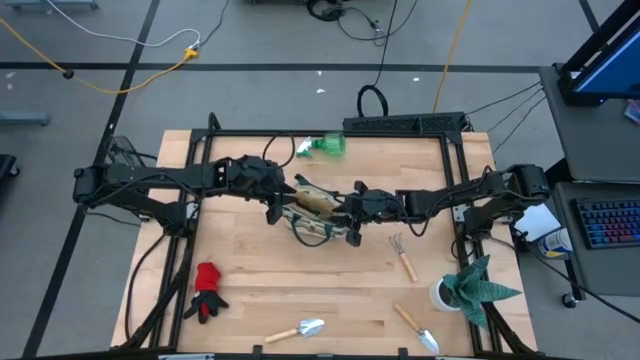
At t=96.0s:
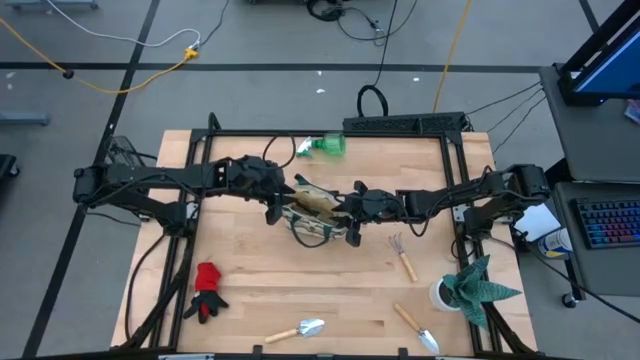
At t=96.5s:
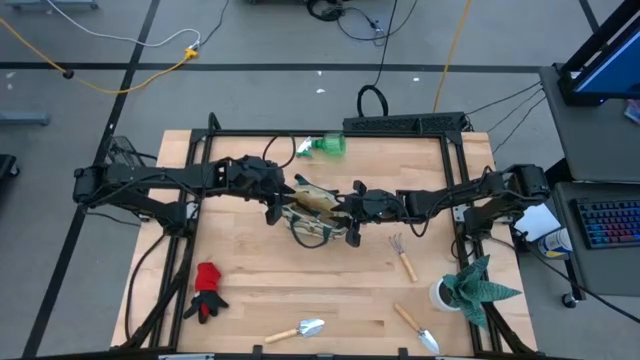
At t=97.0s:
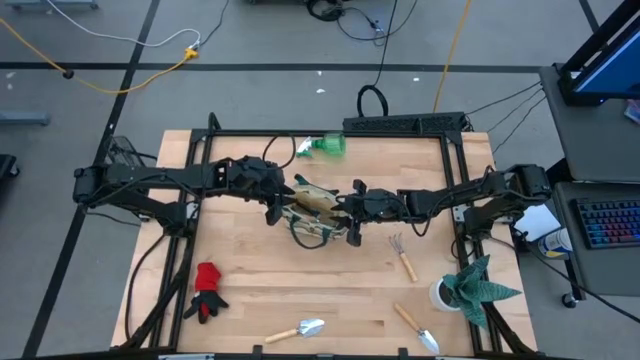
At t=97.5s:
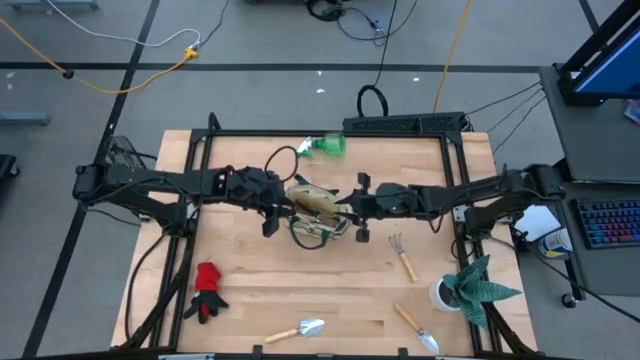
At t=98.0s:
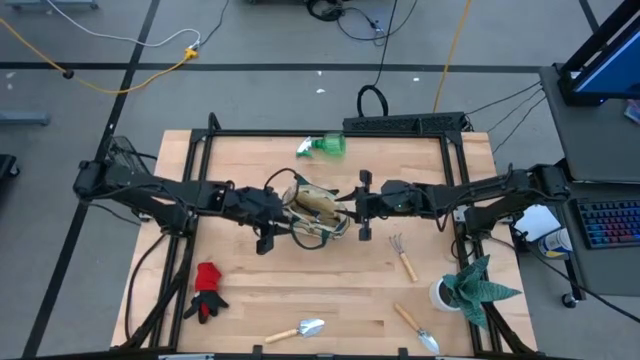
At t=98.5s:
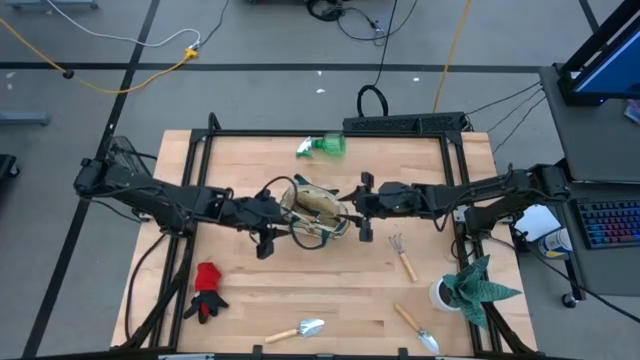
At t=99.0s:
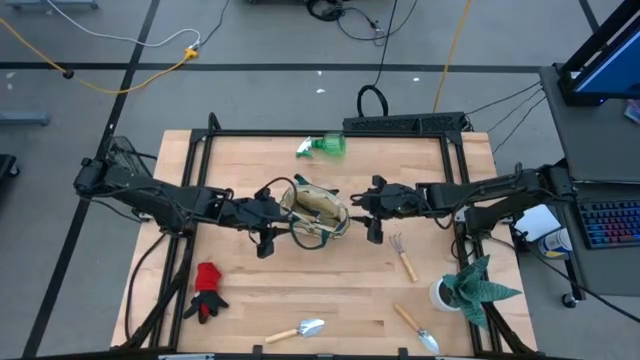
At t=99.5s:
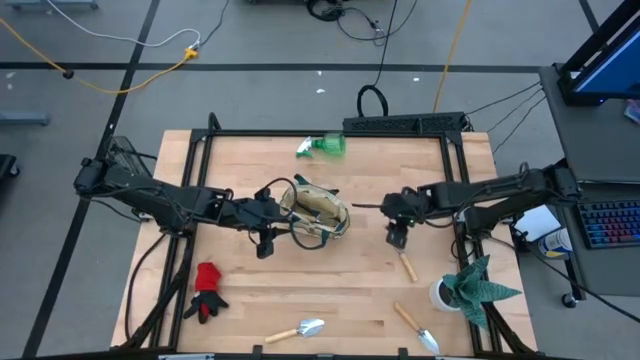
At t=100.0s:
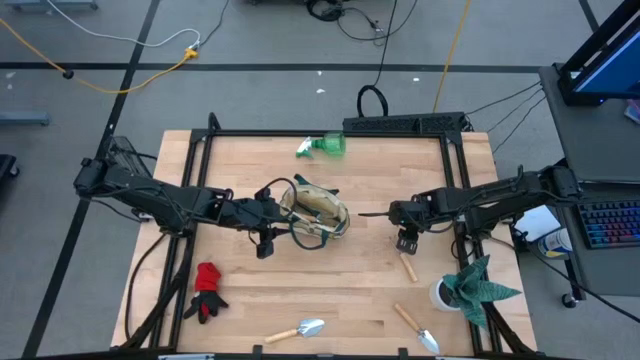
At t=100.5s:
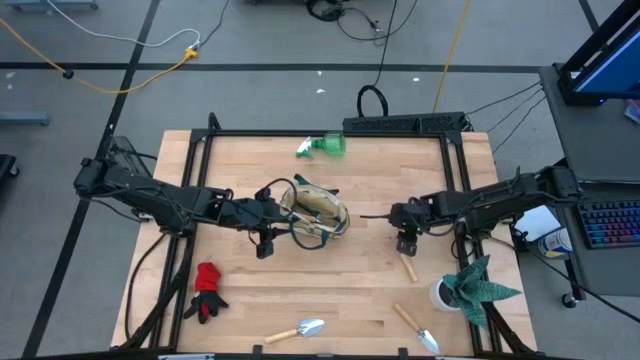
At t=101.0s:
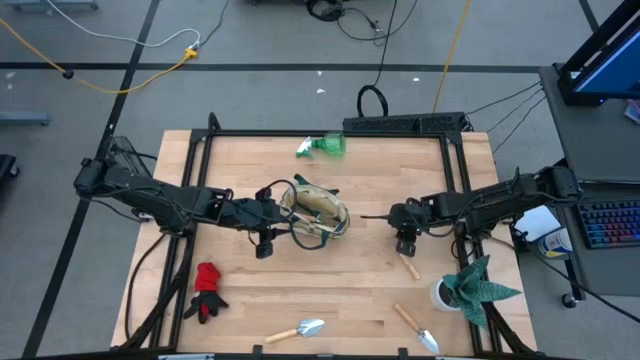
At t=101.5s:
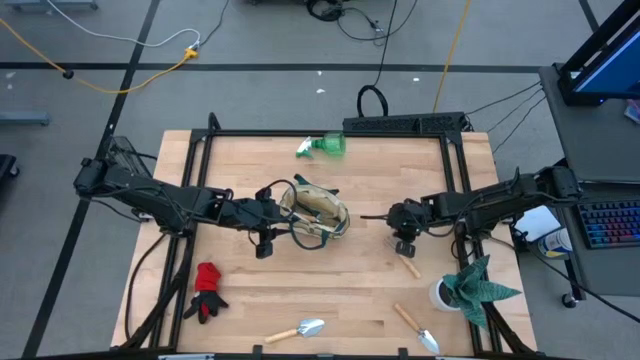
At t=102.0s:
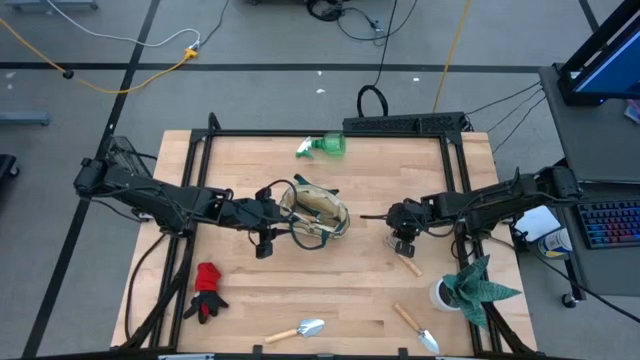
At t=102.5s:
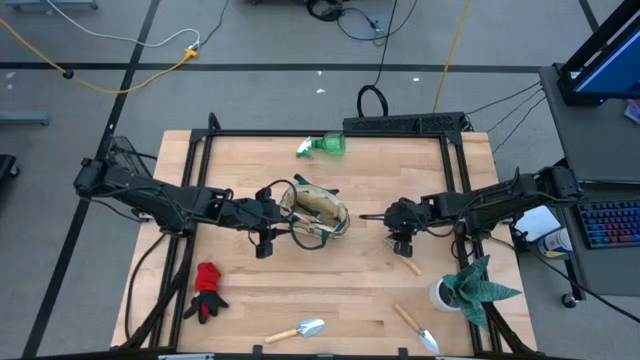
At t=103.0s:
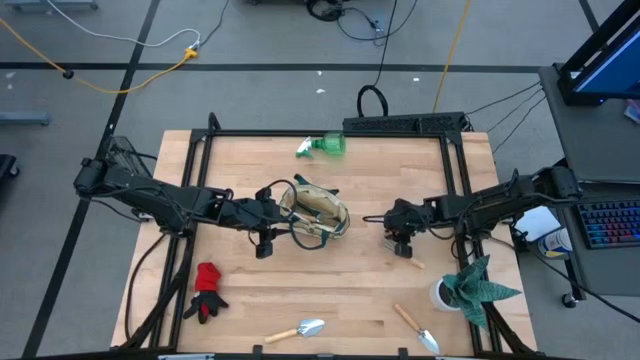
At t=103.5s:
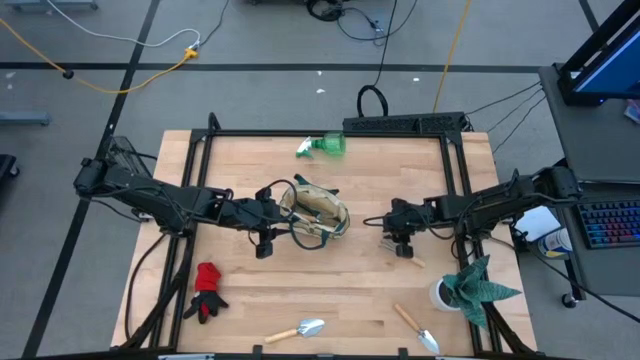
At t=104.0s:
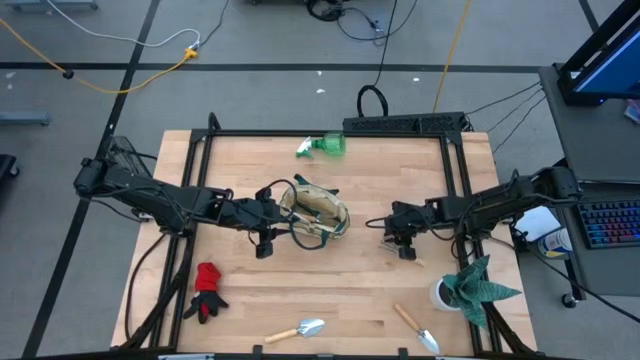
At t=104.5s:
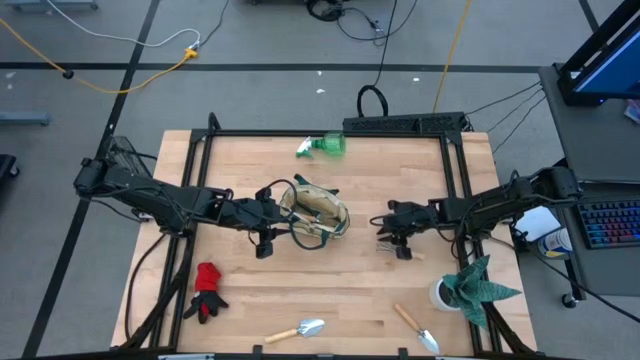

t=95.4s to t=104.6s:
Task: Pick & Place Garden tools in Gardening bag
Put the brown hand rake into the brown gardening bag

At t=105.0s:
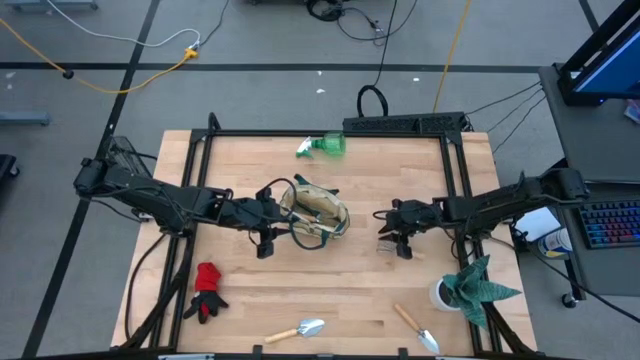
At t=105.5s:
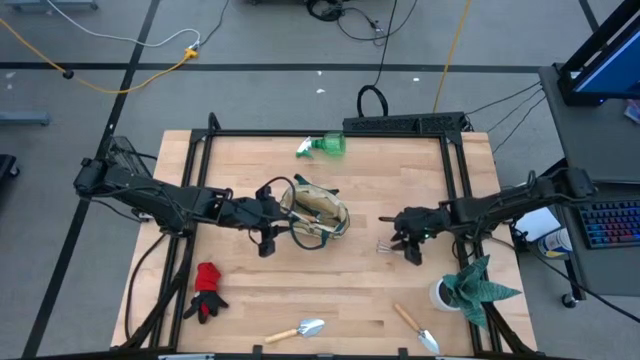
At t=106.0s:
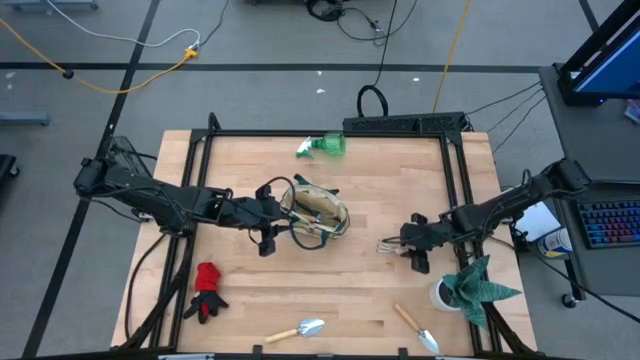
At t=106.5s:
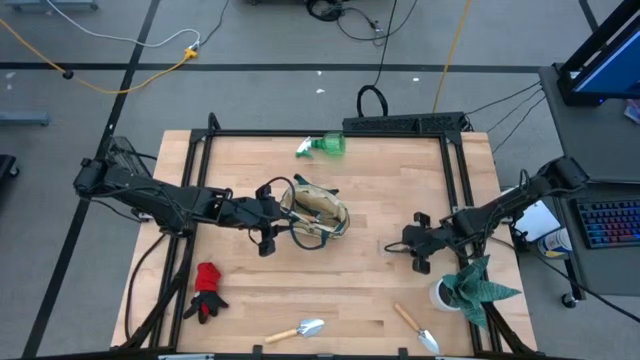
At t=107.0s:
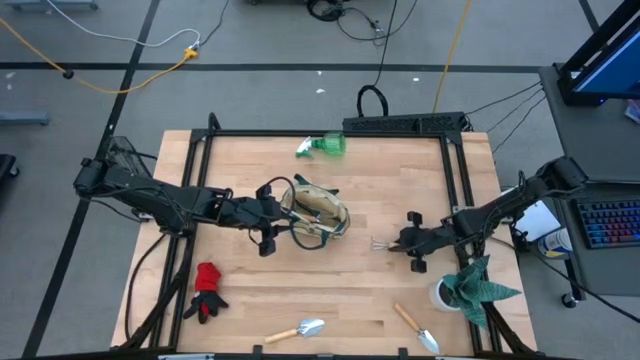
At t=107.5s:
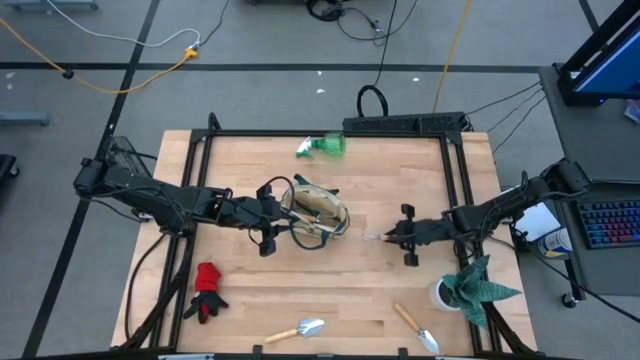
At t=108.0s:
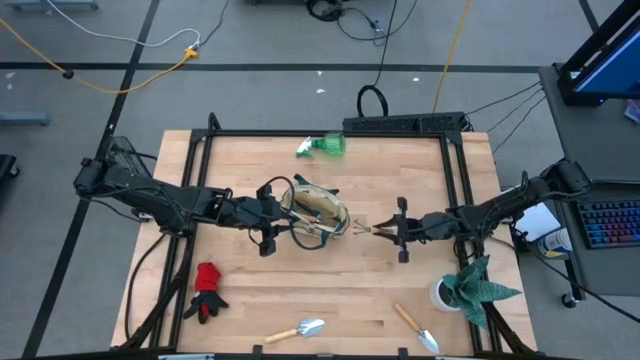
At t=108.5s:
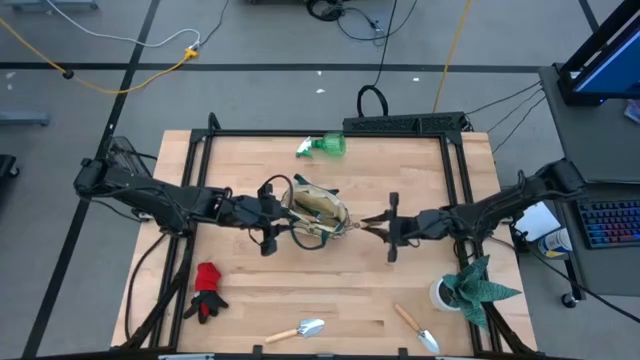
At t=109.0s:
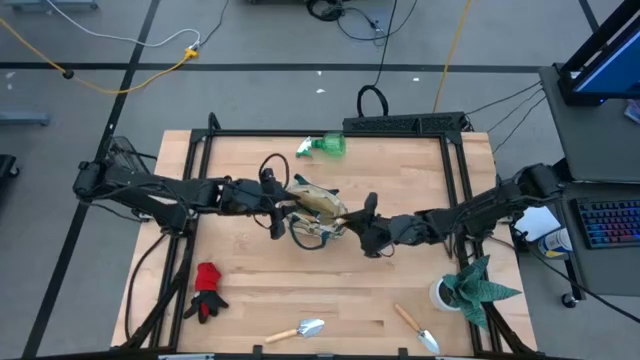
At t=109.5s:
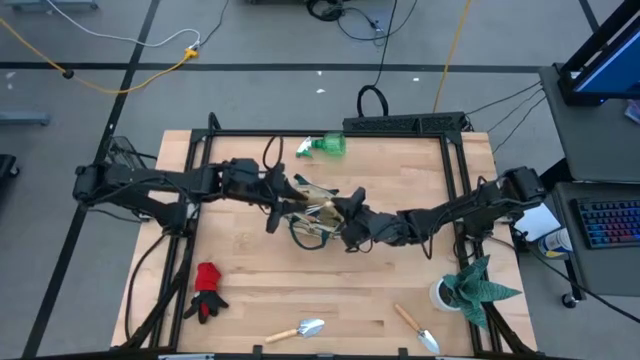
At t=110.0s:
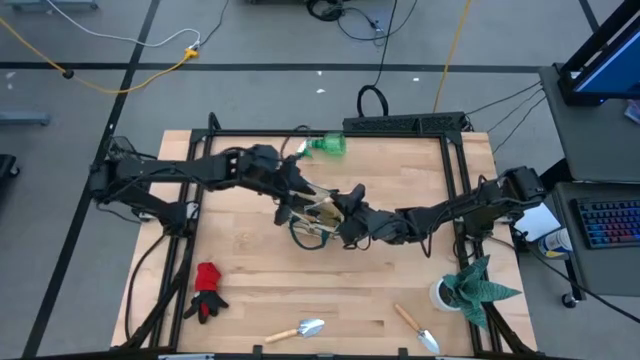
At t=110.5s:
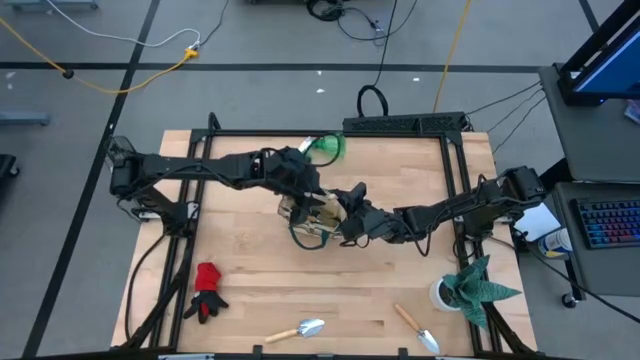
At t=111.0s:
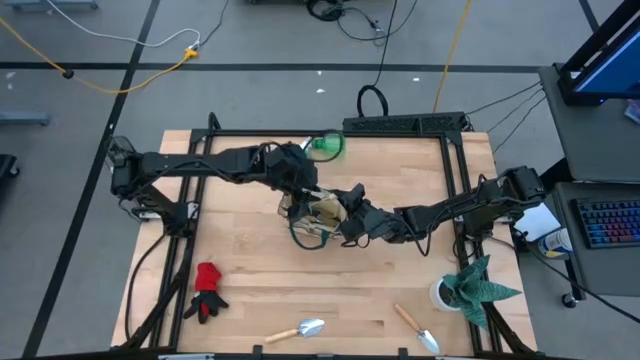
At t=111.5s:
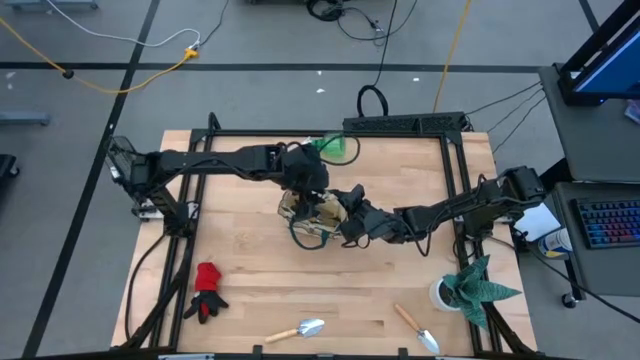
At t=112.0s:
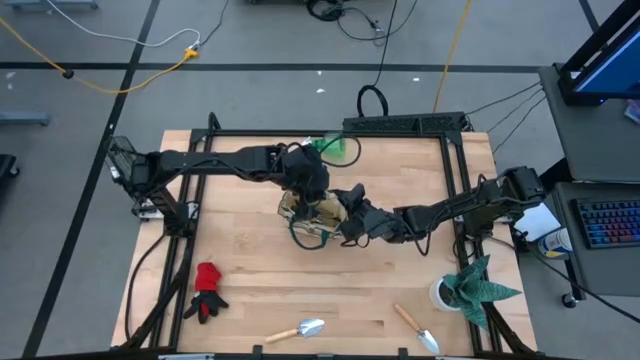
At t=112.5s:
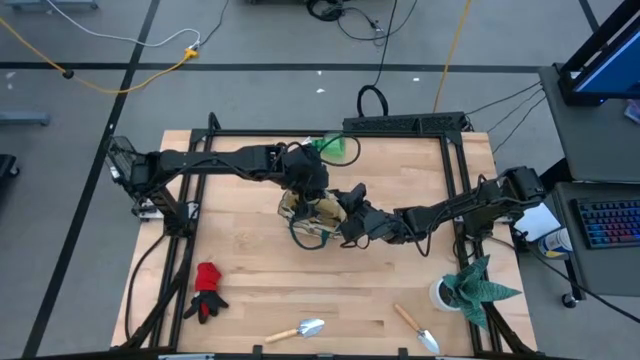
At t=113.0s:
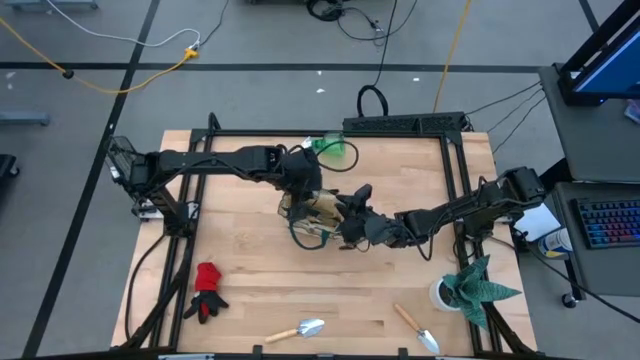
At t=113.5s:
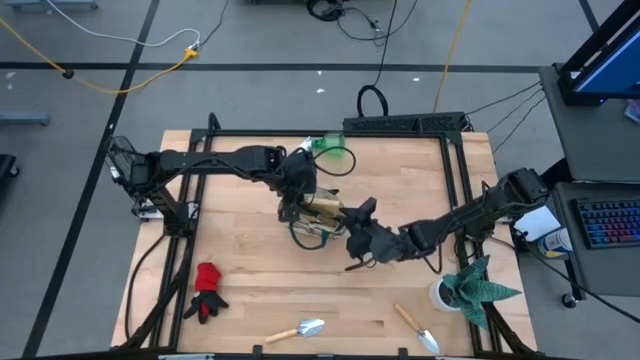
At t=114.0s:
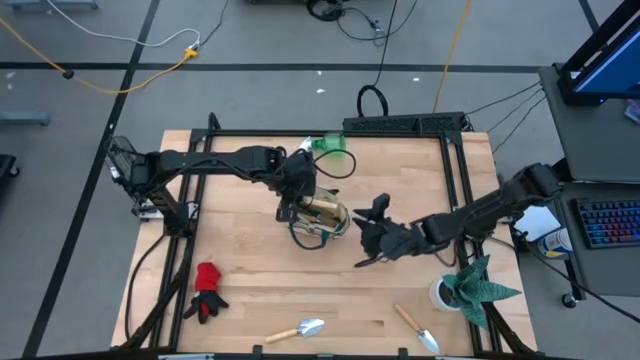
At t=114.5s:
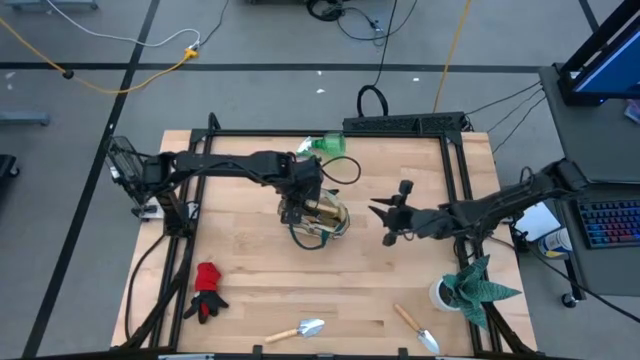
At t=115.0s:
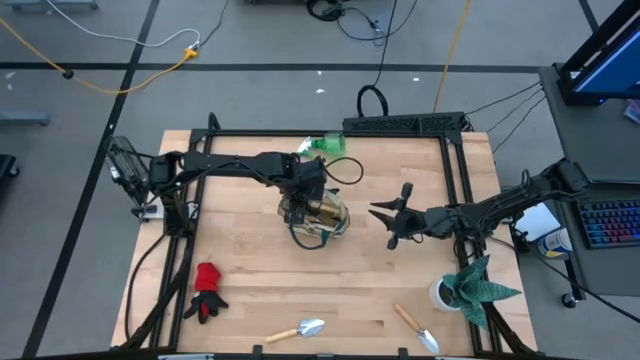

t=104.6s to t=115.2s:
Put the brown hand rake into the brown gardening bag

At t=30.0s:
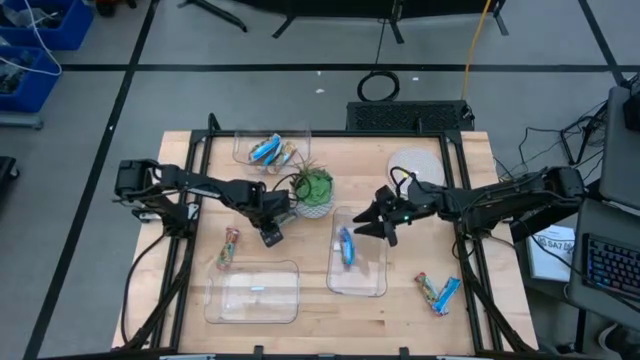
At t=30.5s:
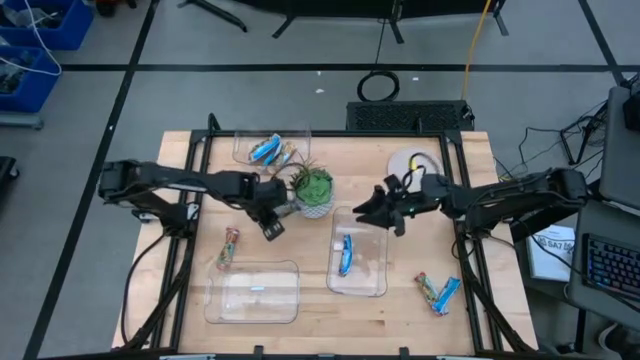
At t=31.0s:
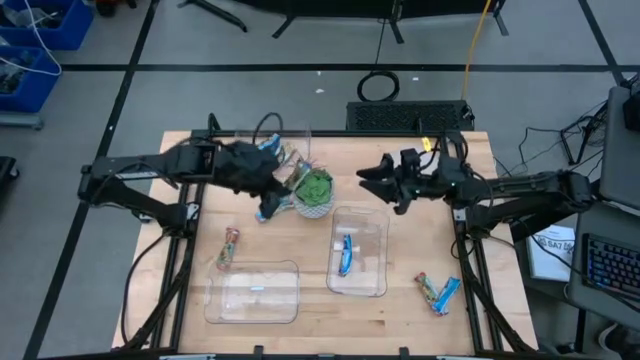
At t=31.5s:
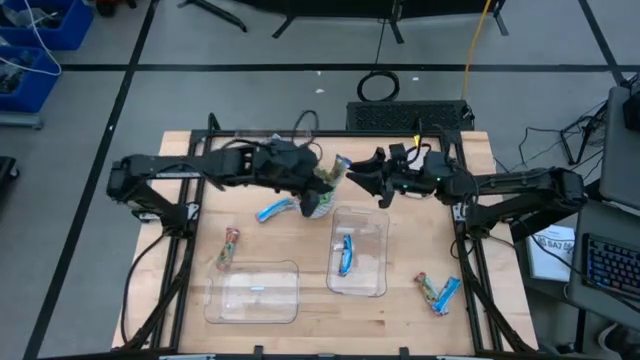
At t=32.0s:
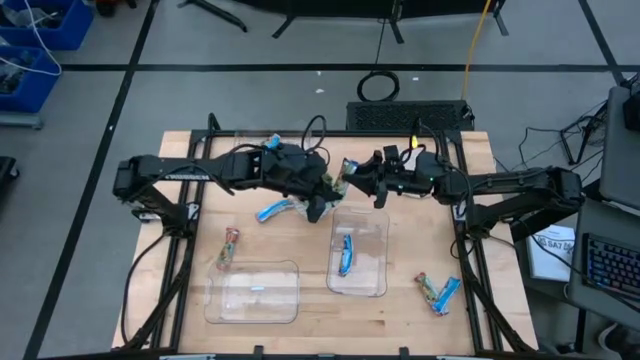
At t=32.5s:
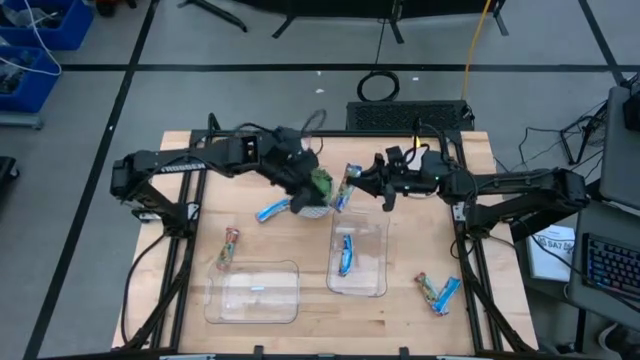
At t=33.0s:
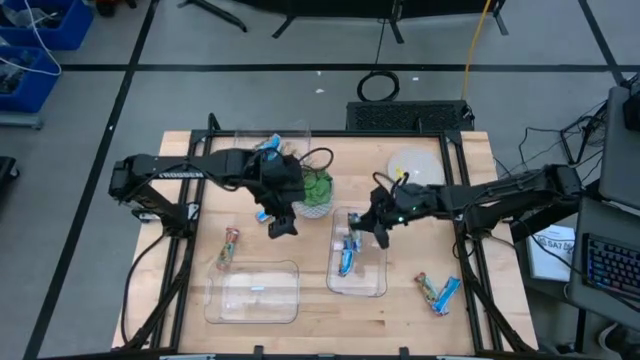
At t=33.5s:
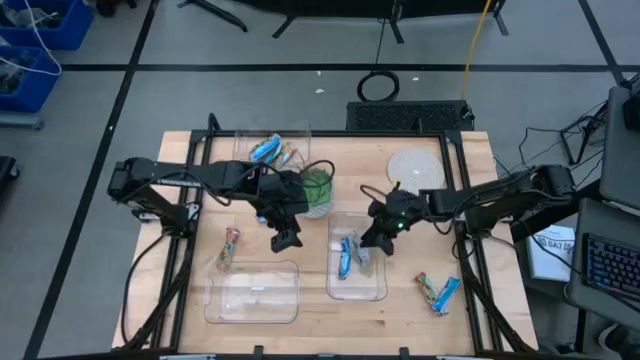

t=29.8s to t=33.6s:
Task: Pick and place Granola Bars by type
Put the top blue granola bar into the middle transparent bin
